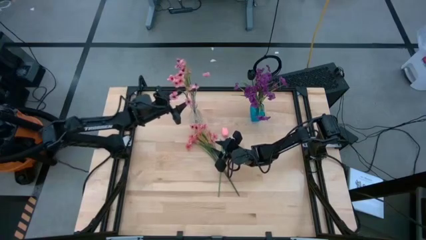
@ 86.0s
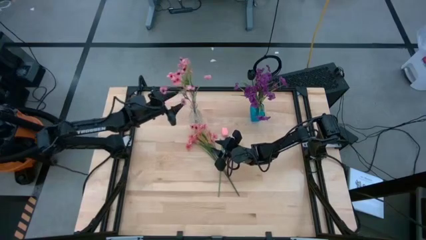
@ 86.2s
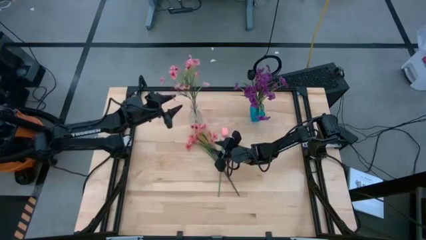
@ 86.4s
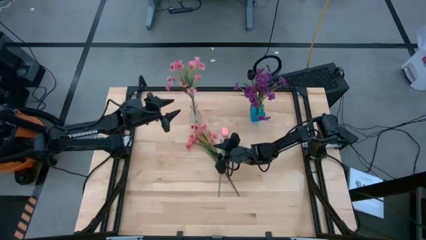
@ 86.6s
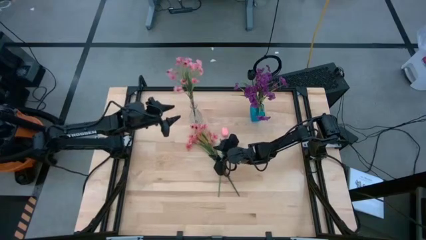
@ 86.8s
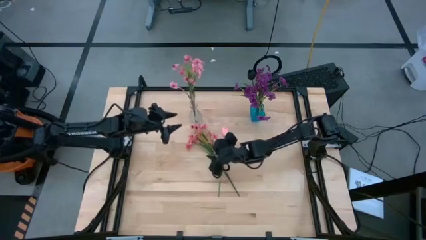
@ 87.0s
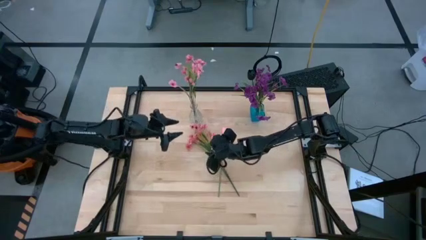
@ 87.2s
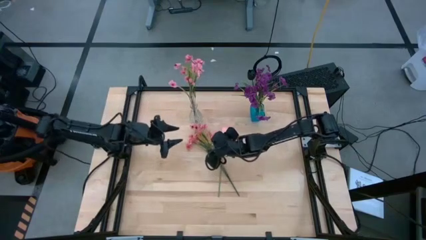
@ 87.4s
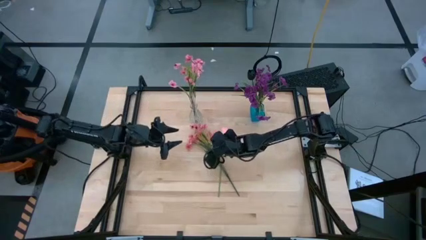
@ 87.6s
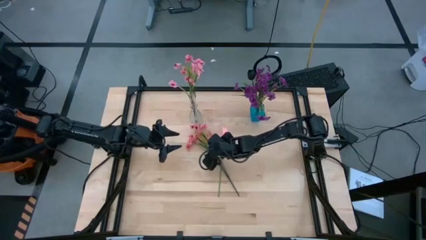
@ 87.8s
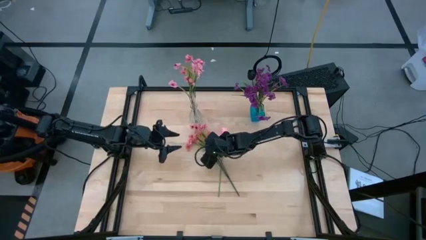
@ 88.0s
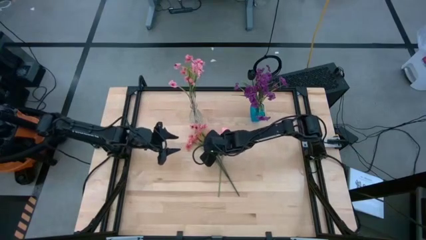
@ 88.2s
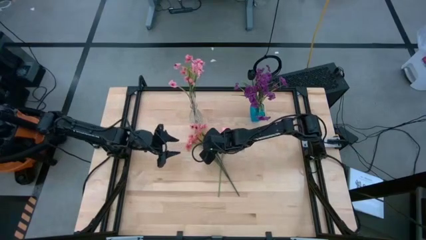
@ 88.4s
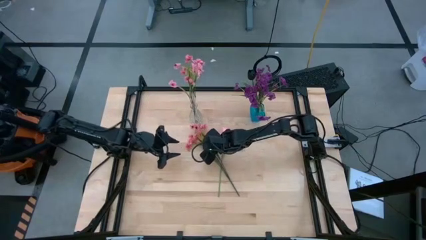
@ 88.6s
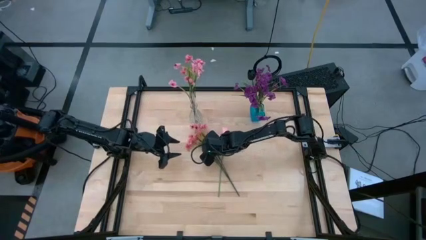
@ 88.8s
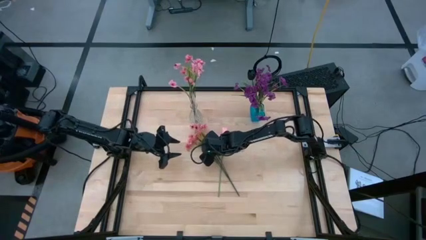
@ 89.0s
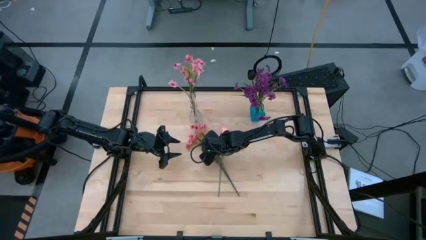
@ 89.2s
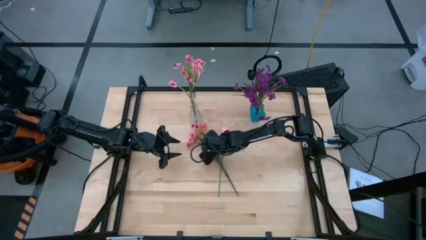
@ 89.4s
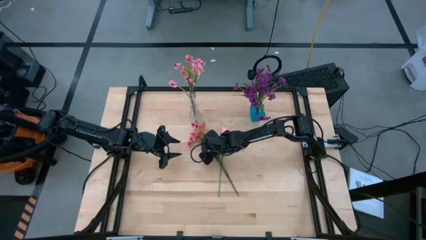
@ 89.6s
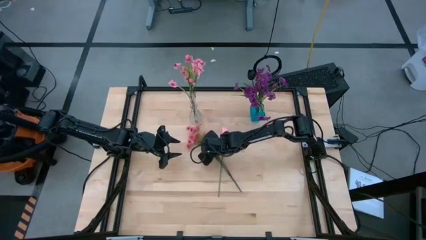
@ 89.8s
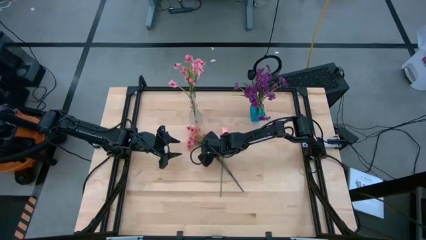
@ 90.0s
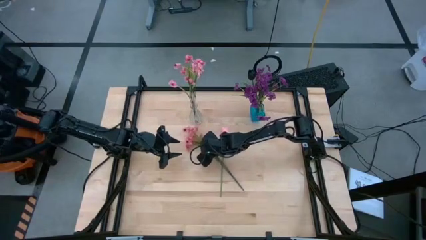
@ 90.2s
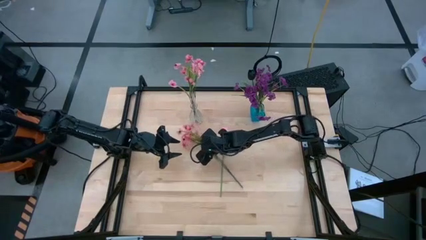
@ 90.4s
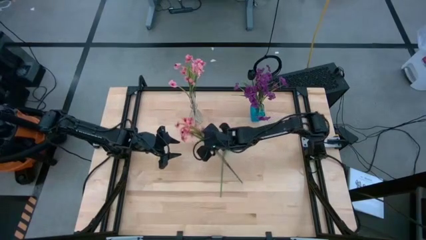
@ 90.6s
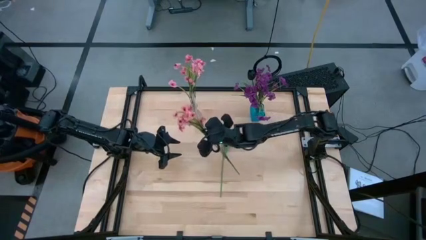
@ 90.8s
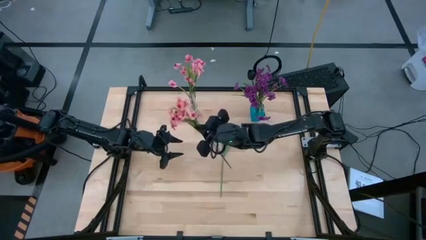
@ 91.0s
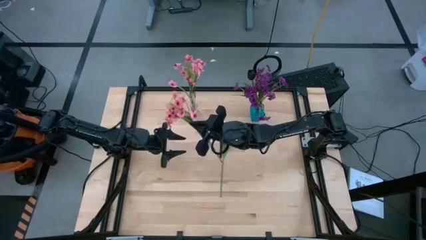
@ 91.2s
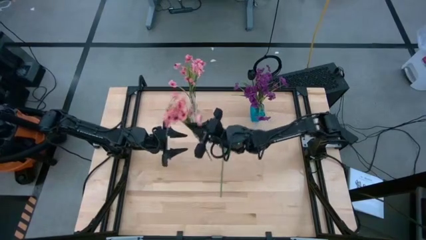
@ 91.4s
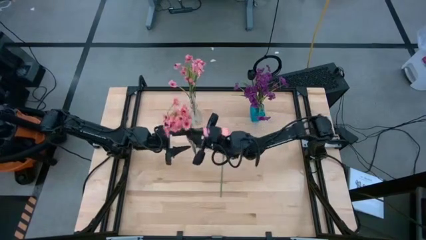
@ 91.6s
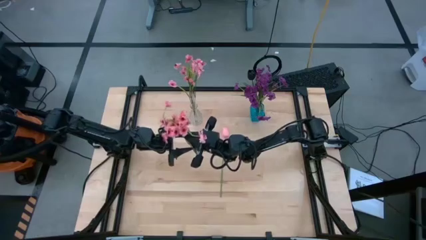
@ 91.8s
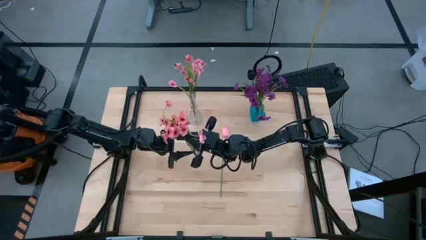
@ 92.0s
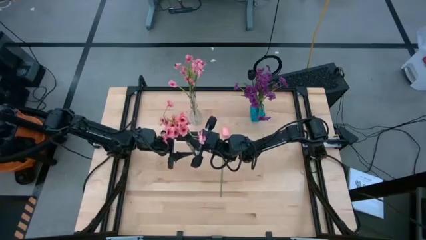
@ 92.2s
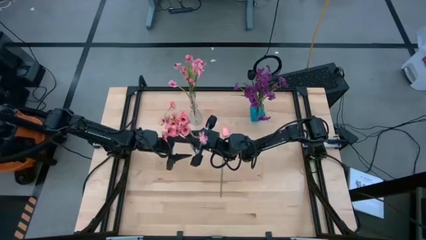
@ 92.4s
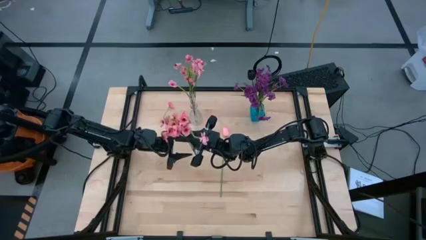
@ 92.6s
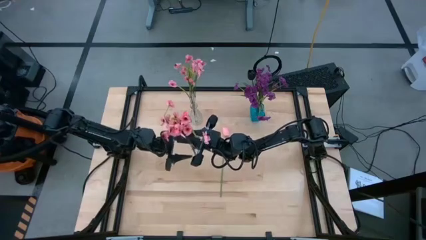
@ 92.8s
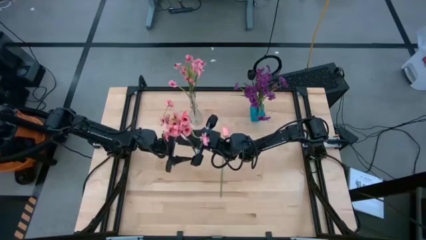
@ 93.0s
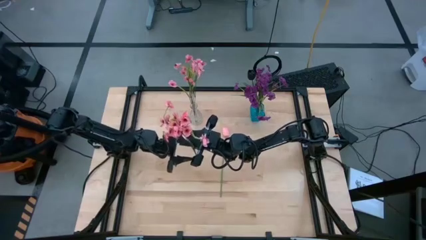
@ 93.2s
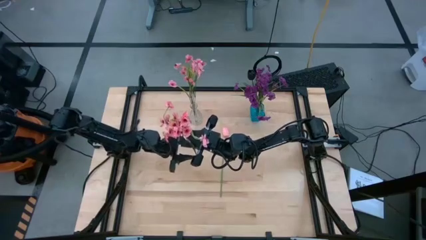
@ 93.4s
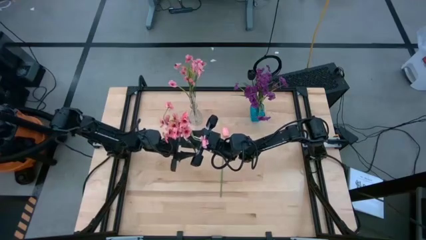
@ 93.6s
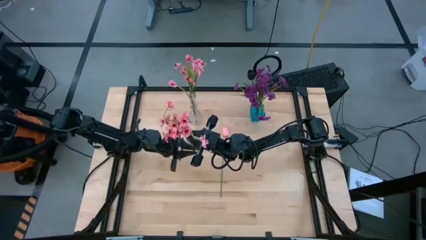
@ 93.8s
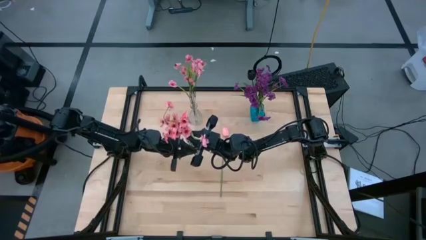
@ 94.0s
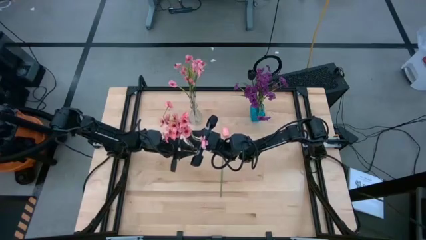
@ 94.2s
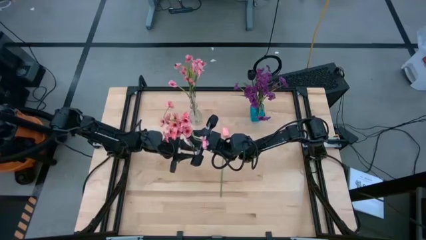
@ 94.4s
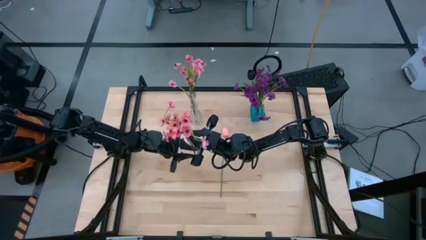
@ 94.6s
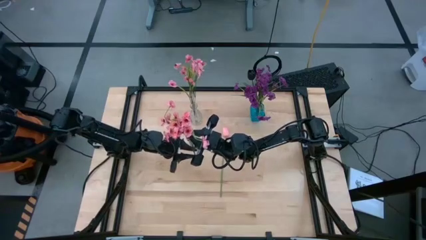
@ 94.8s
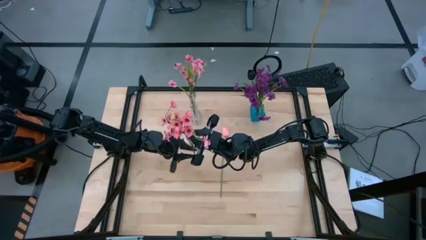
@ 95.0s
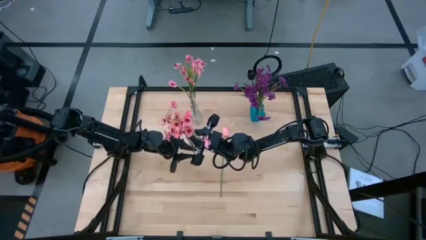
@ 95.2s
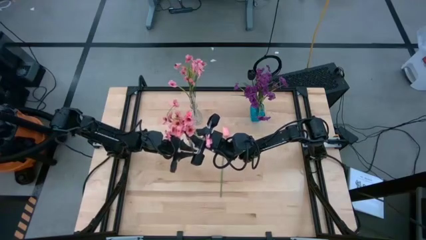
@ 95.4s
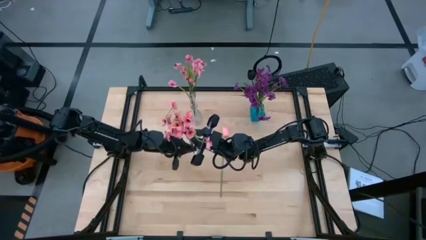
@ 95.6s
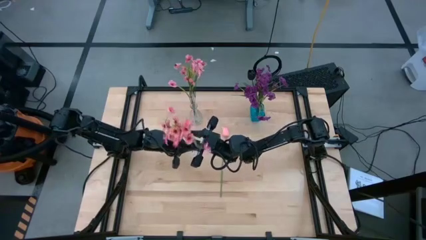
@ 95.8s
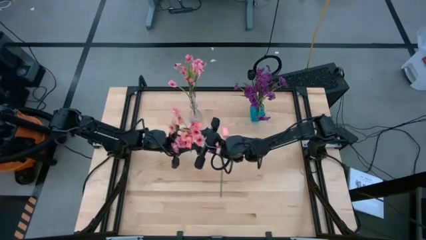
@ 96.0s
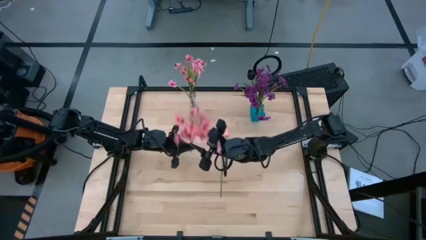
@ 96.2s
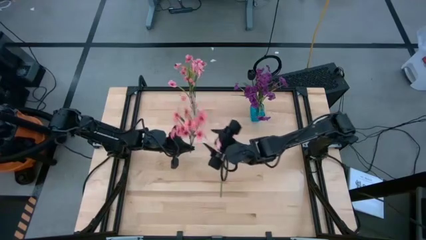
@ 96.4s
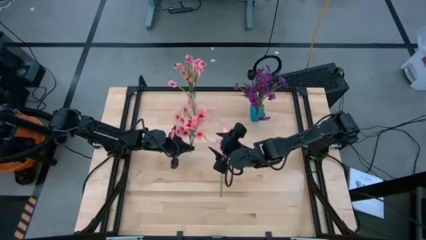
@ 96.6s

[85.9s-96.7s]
Task: Sort flowers into vase by color
Put the left pink flower into the transparent vase

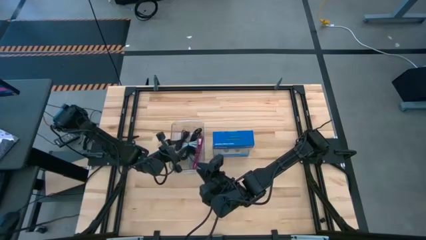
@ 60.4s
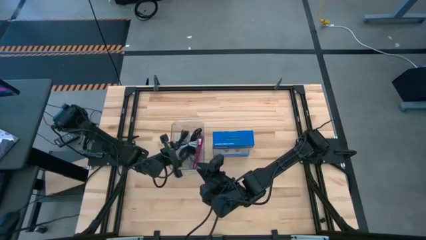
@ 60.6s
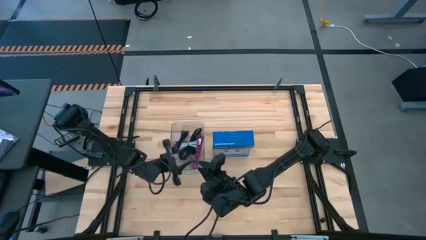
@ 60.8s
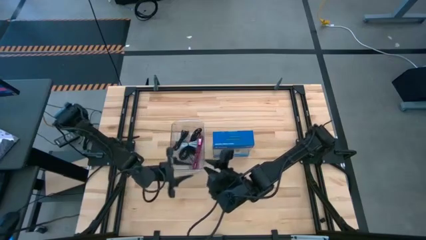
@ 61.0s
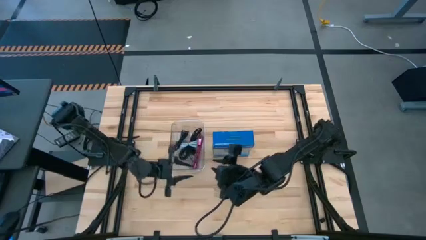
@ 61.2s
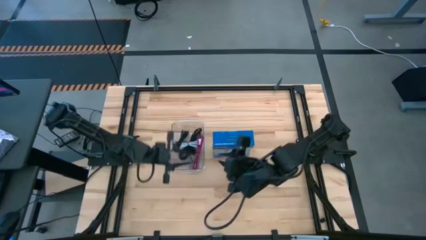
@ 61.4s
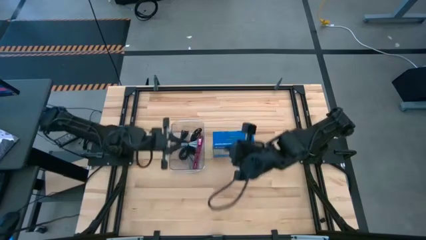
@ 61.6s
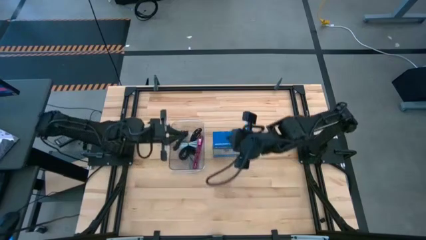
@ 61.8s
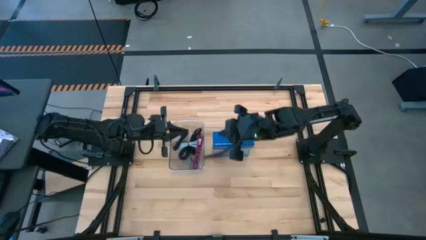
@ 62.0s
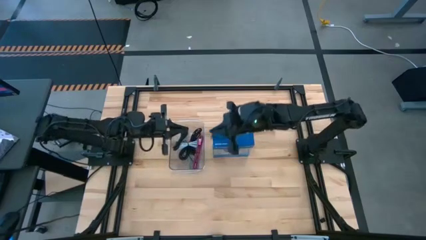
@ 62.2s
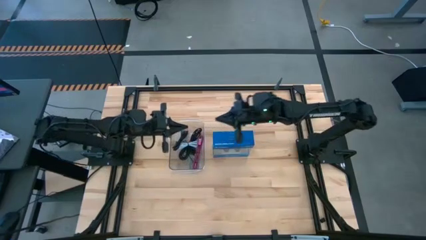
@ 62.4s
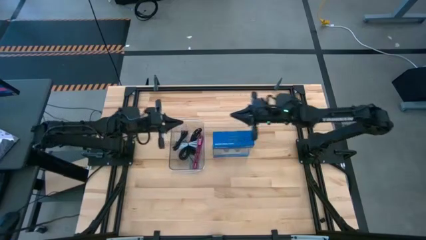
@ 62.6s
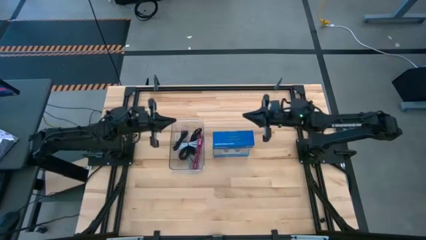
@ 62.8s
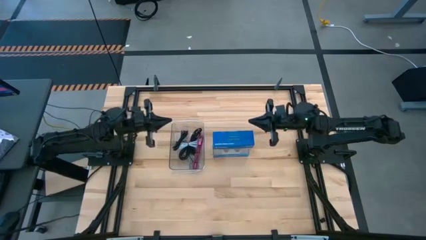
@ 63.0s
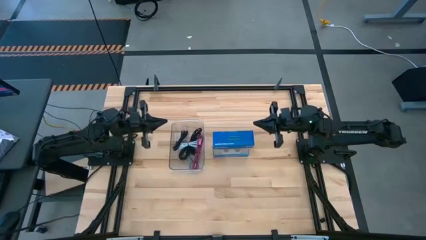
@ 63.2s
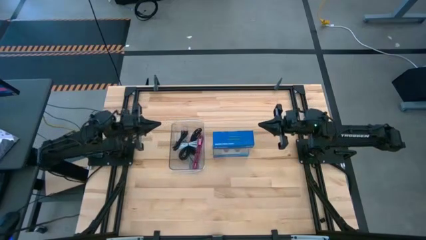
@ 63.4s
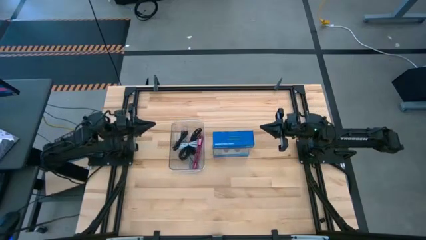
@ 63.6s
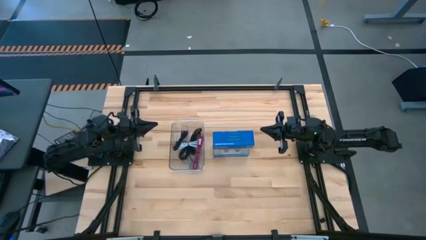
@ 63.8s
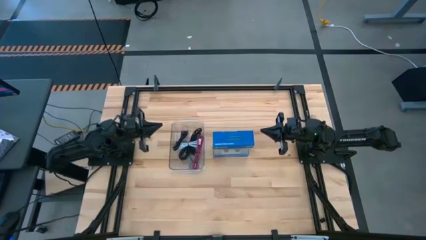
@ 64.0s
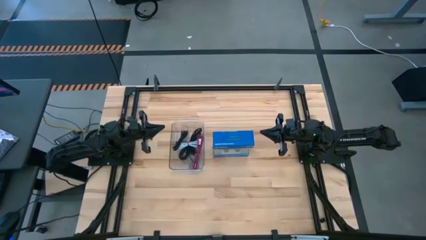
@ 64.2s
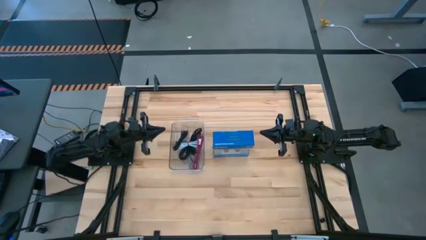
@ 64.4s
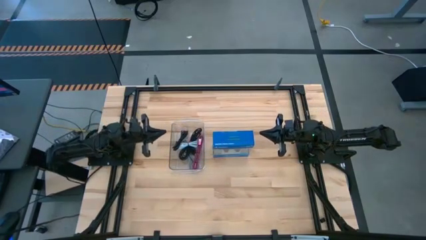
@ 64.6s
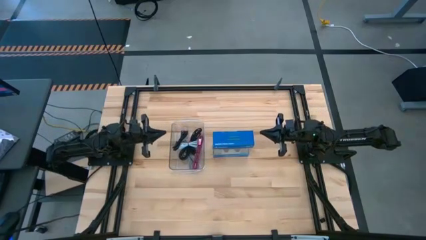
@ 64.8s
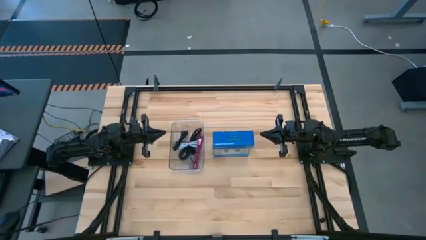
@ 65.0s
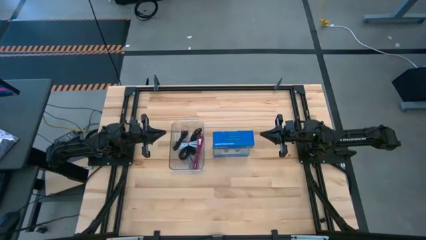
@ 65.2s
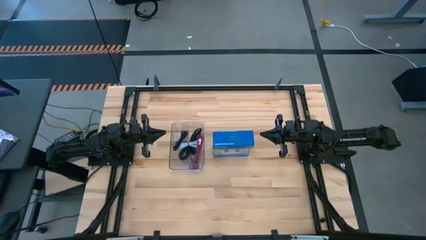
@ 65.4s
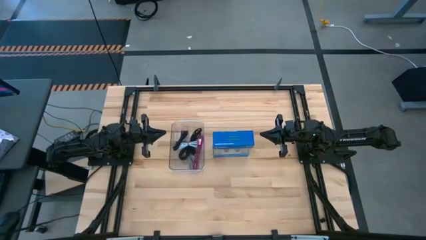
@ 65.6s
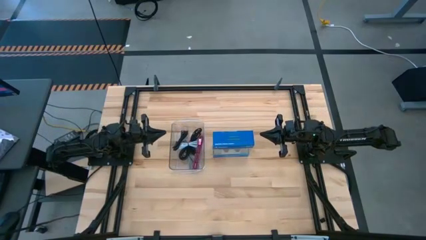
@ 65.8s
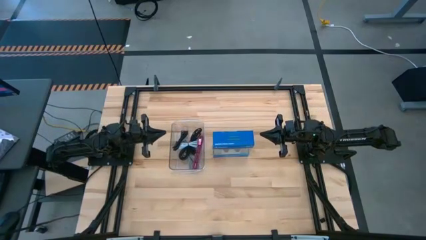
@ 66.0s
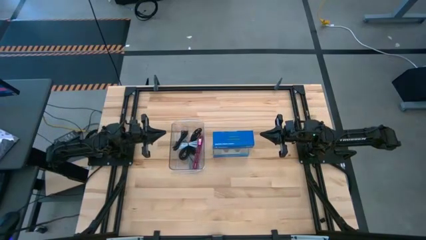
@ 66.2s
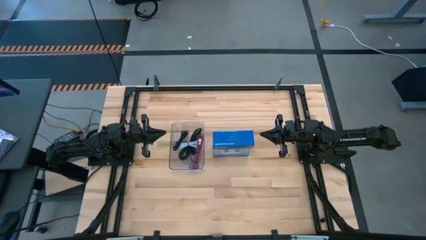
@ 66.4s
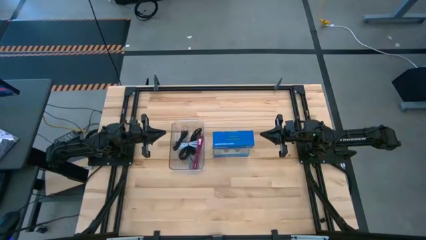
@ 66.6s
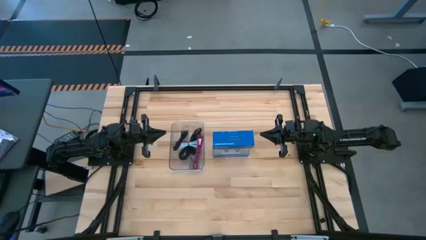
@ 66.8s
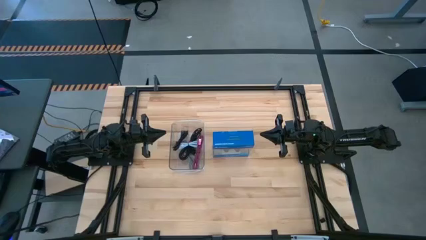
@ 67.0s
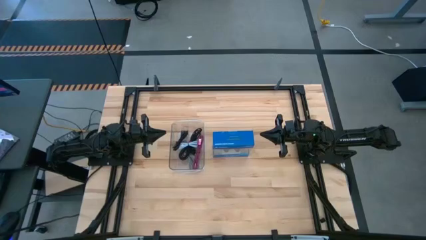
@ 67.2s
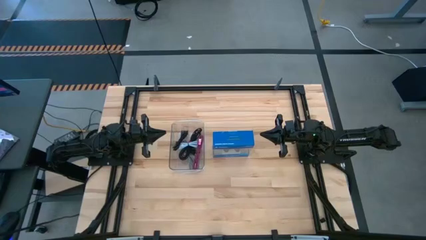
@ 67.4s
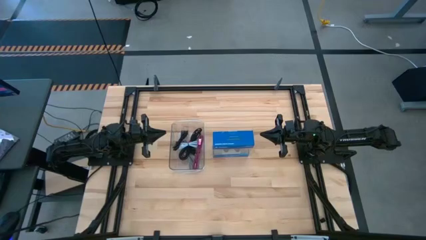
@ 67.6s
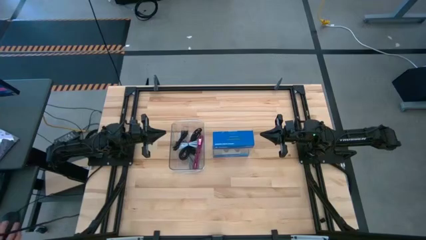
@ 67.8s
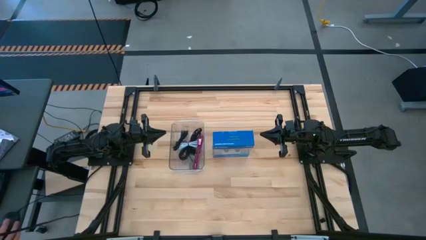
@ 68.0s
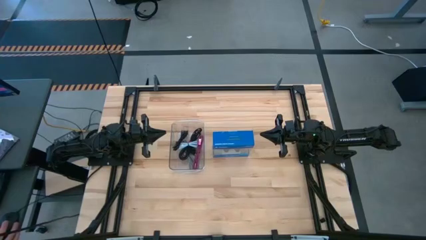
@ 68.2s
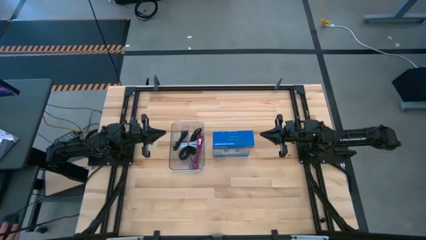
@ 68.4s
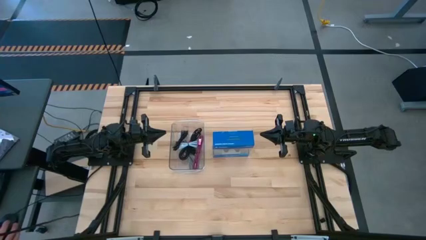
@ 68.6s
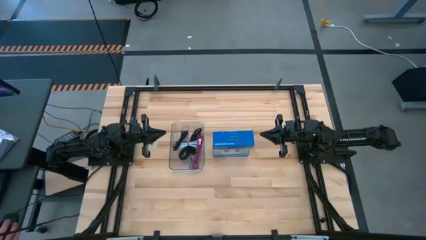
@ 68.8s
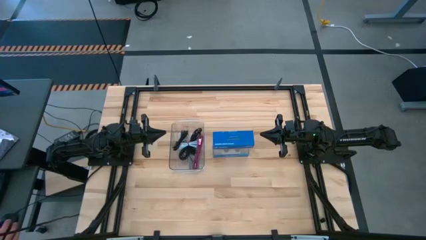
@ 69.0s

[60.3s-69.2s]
Task: Pick and place USB-C Cables
Return to Home Position
